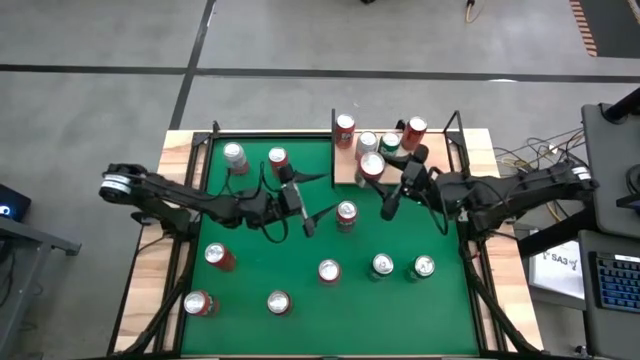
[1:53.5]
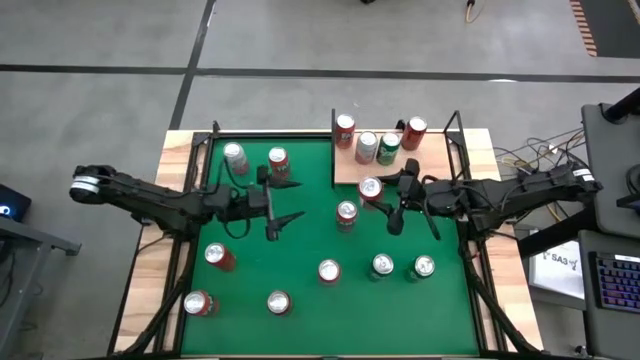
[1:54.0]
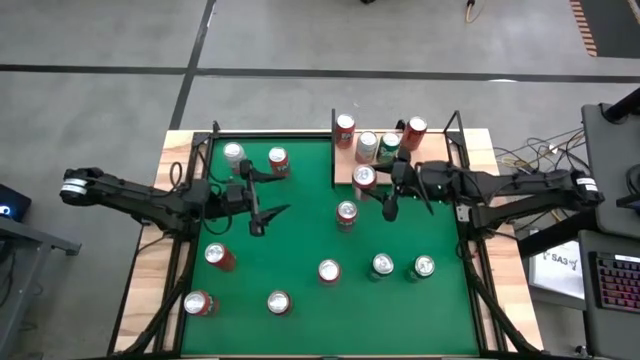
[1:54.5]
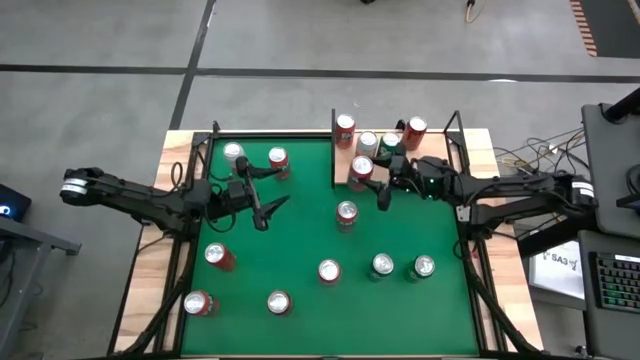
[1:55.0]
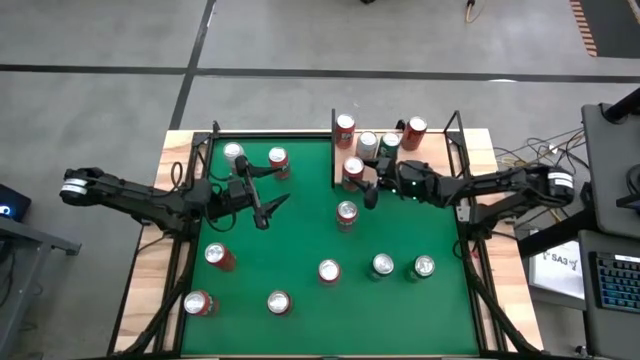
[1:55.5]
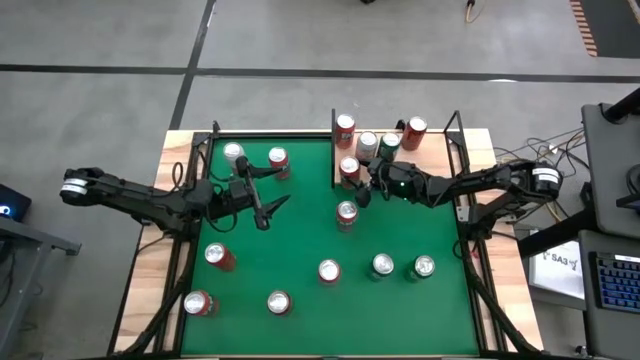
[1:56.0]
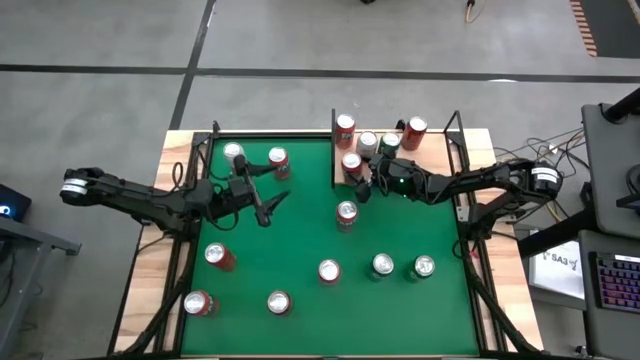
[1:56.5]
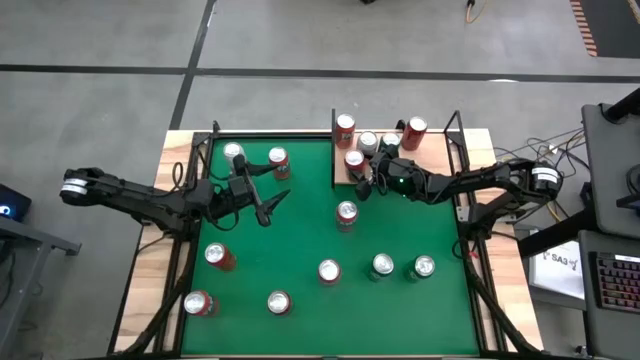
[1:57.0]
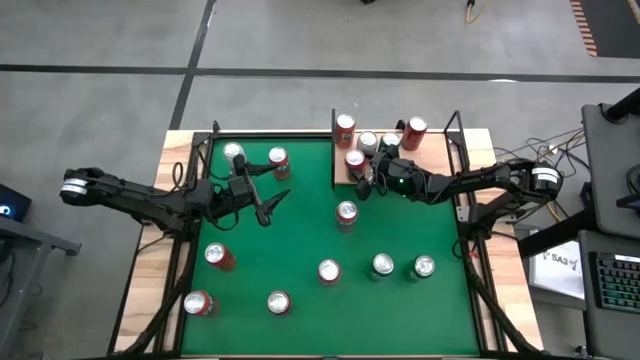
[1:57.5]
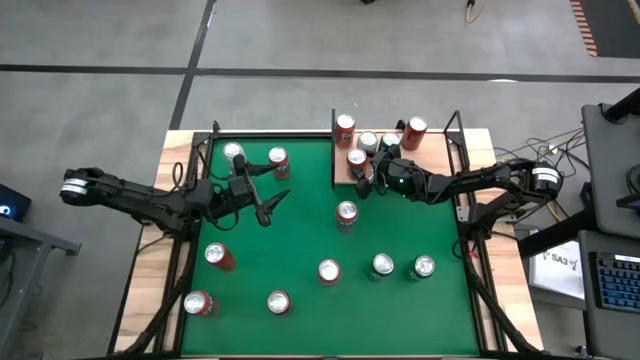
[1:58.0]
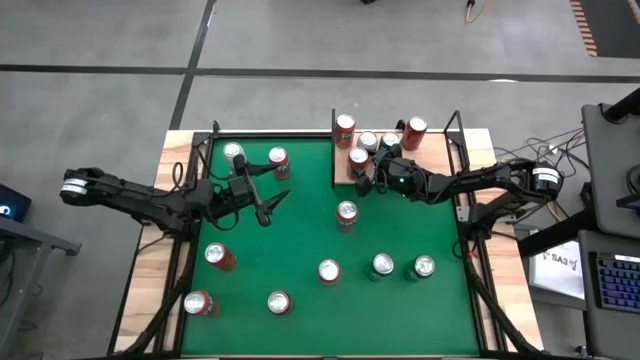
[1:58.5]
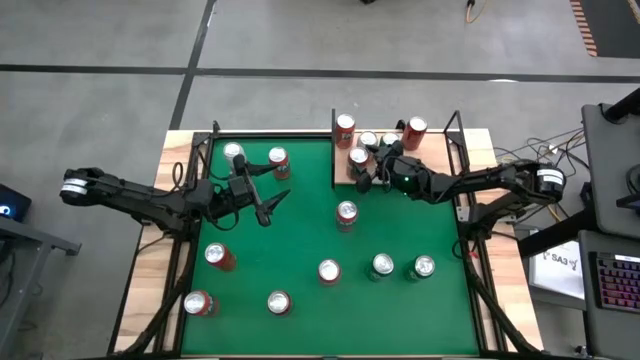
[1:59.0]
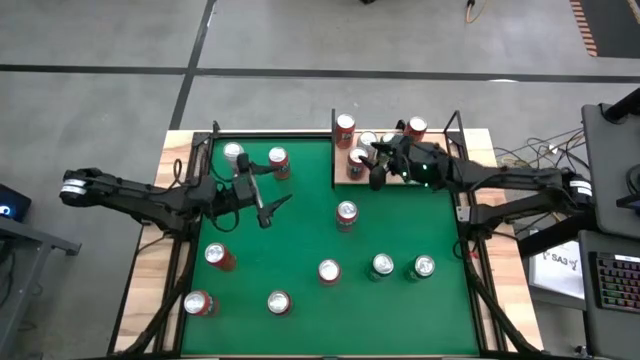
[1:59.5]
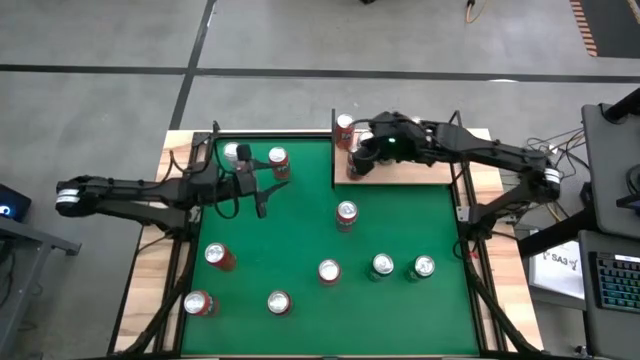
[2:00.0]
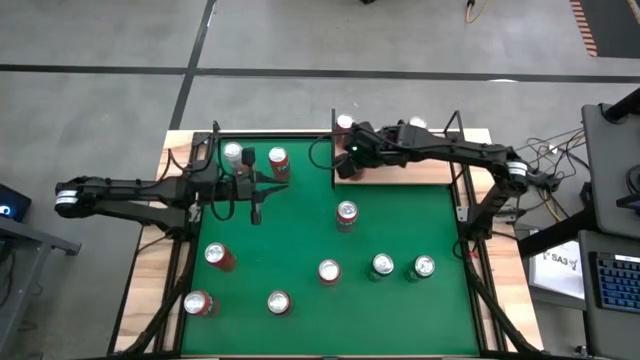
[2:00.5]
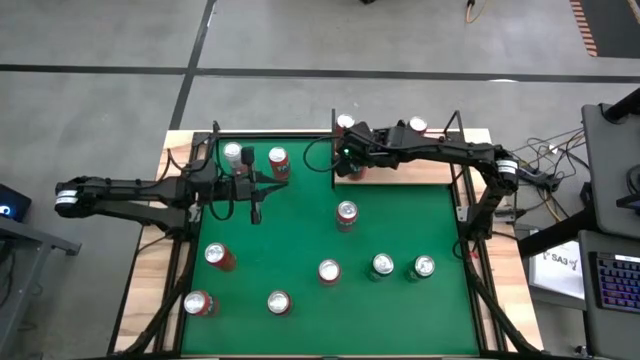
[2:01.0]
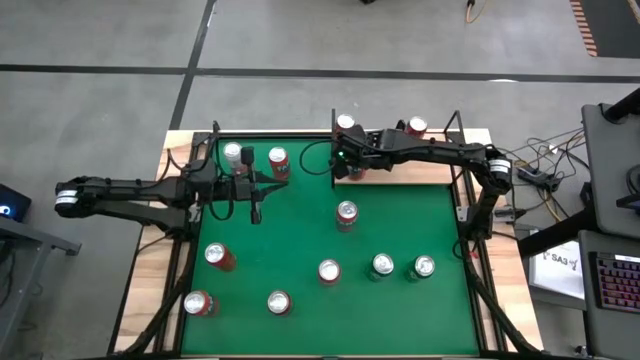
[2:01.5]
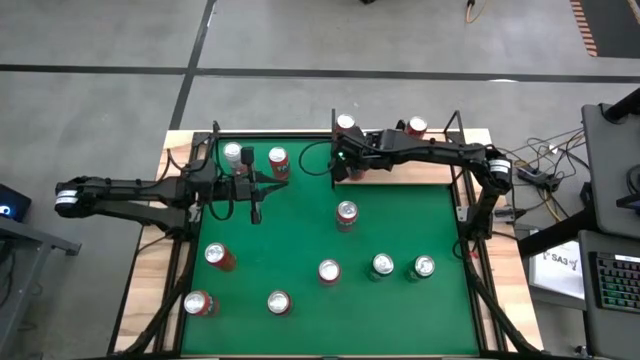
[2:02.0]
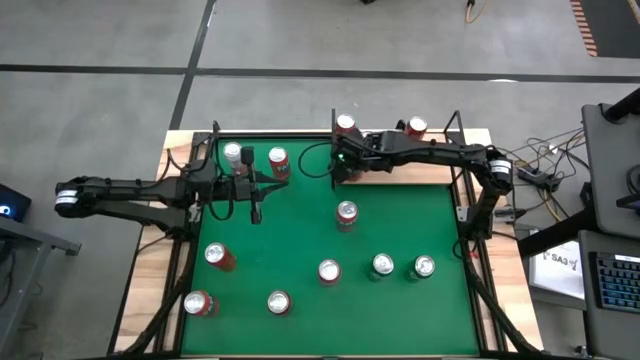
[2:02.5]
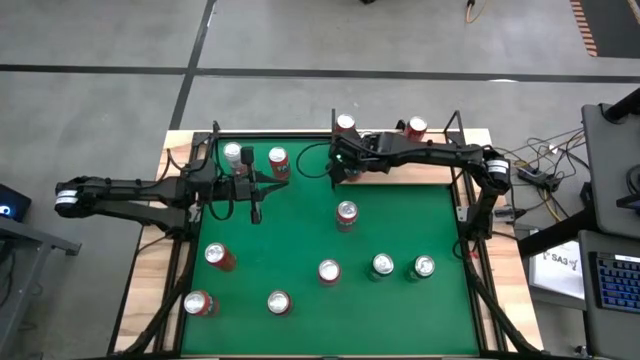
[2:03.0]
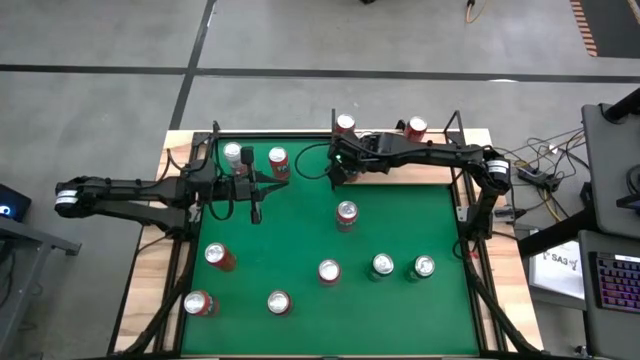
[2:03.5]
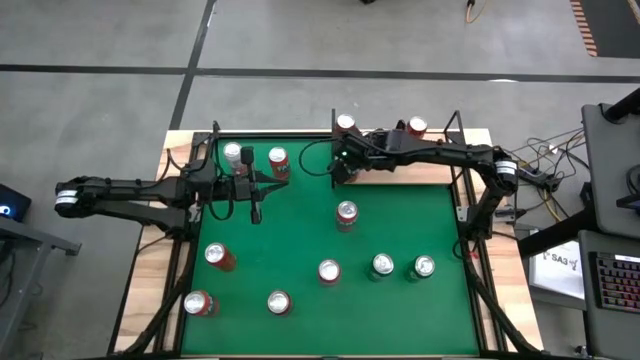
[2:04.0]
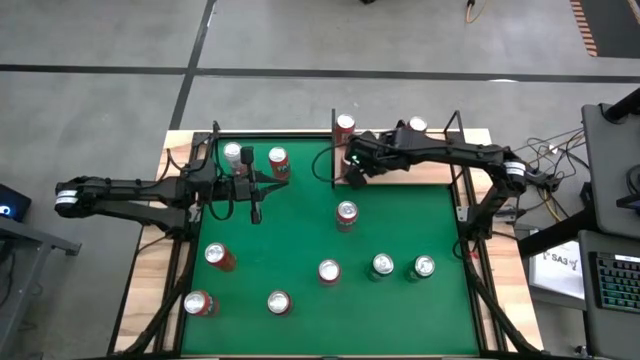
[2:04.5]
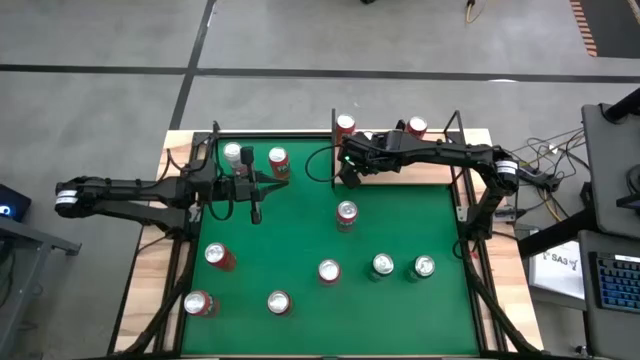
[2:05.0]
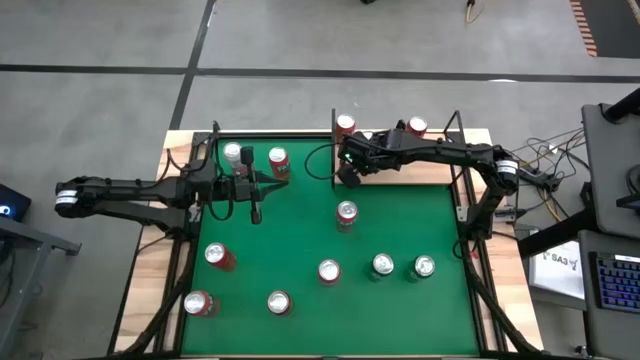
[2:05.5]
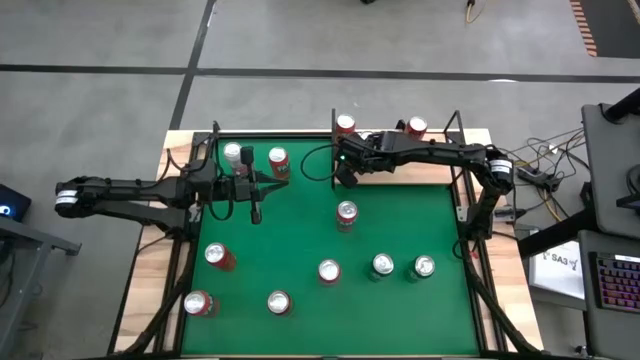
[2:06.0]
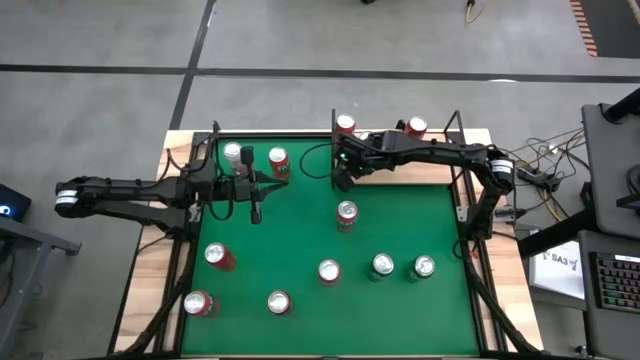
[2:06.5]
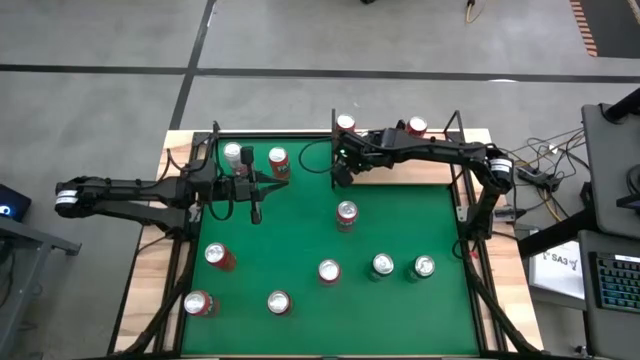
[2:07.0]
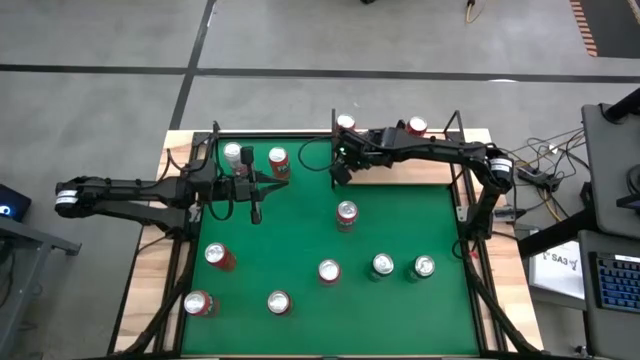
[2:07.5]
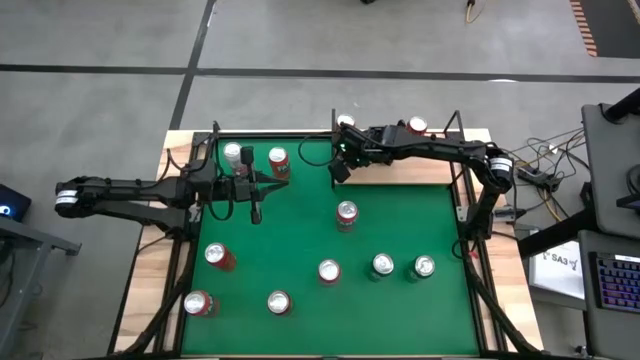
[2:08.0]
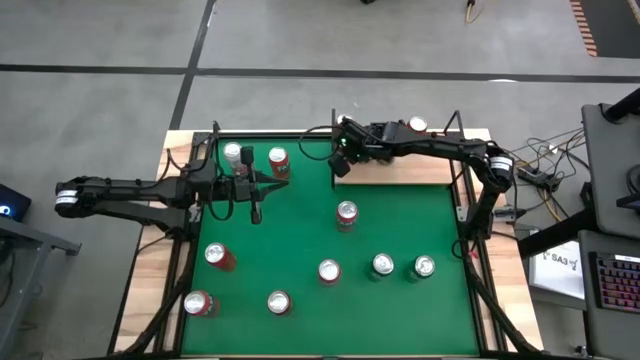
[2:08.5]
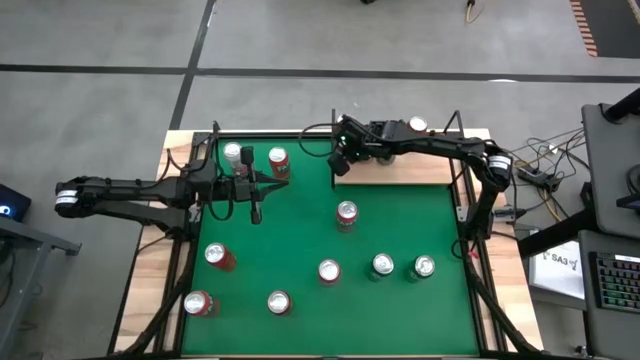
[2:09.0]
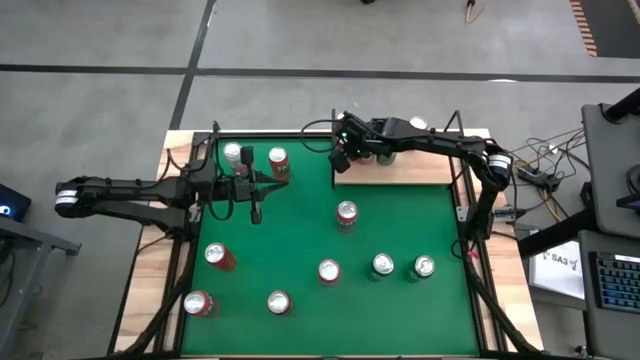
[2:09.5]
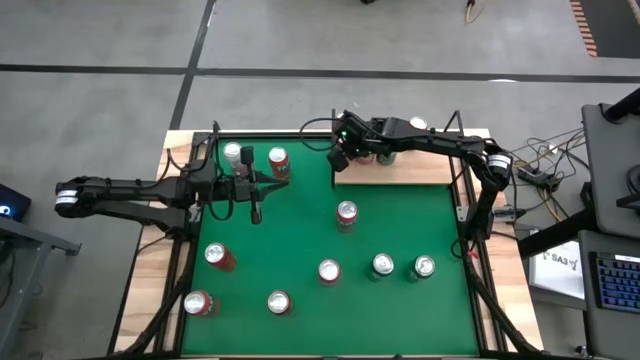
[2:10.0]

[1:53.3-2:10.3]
Task: Place canned beverage on shelf
Put the red soda can on the shelf aligned with the other red soda can
